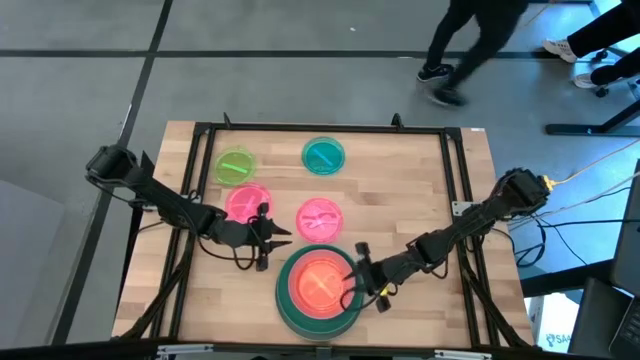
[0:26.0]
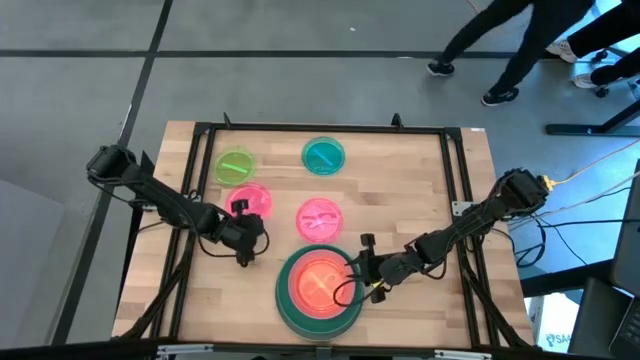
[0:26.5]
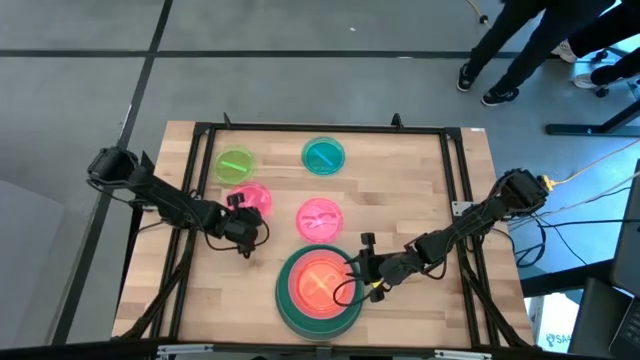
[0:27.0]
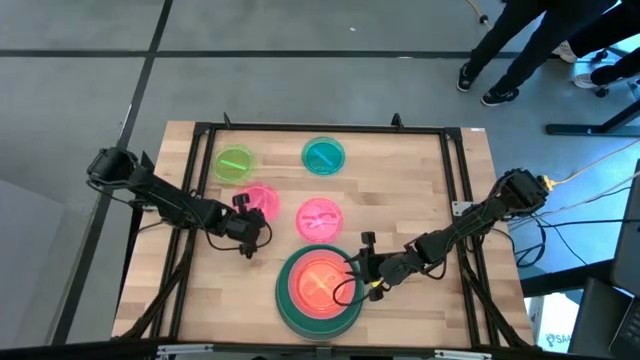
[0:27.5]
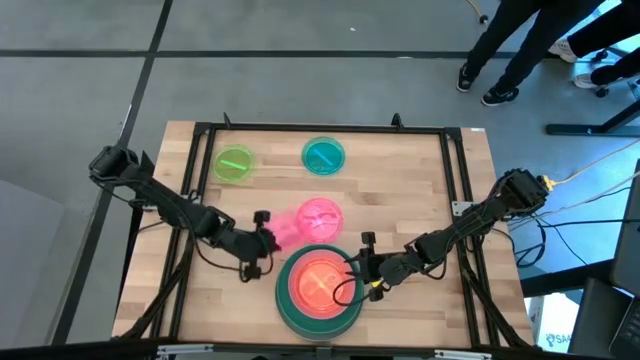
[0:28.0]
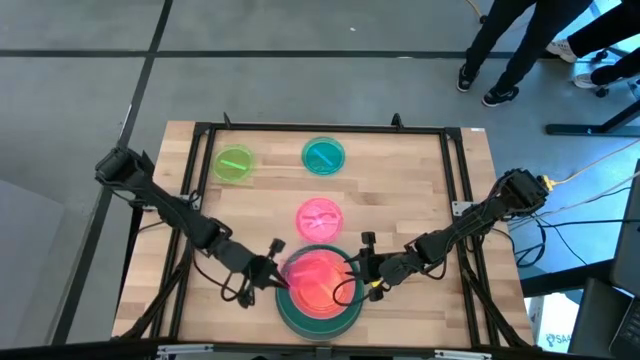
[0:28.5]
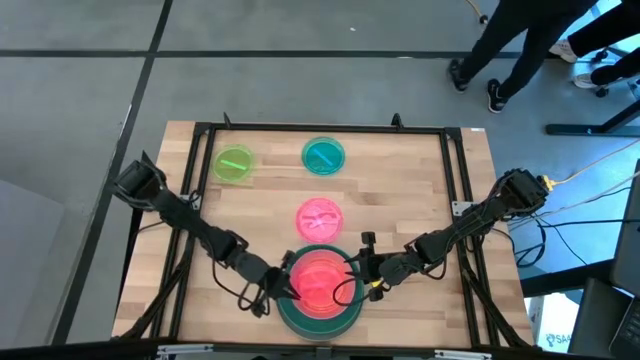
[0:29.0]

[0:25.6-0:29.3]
Task: Stack plastic plates
Stack the left pink transparent plate on the orange transparent plate

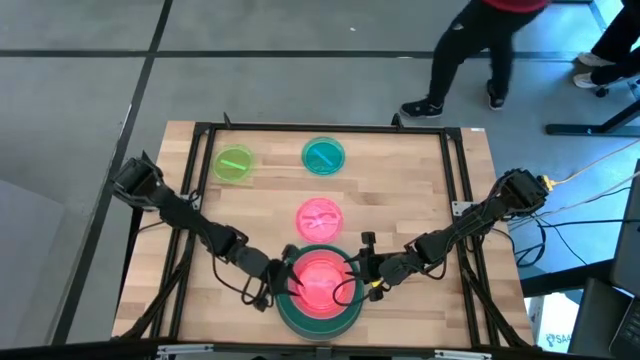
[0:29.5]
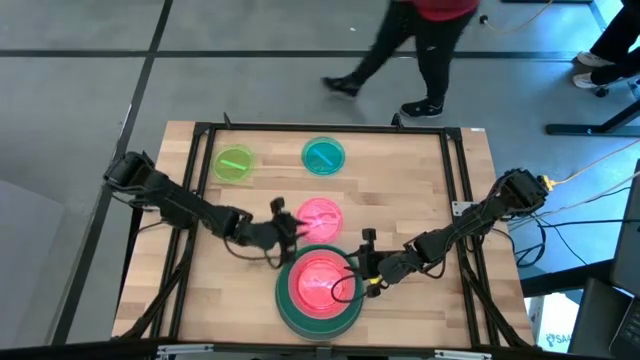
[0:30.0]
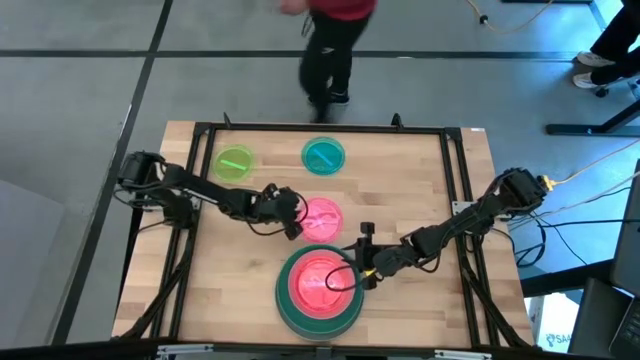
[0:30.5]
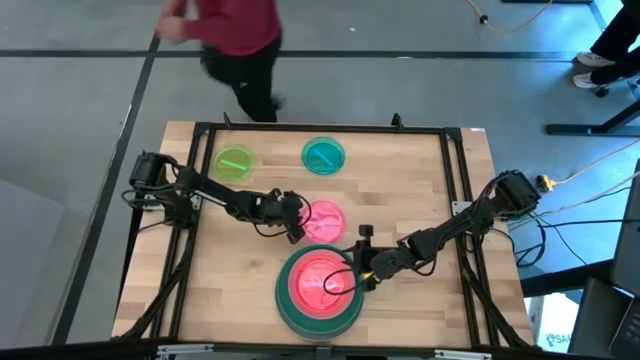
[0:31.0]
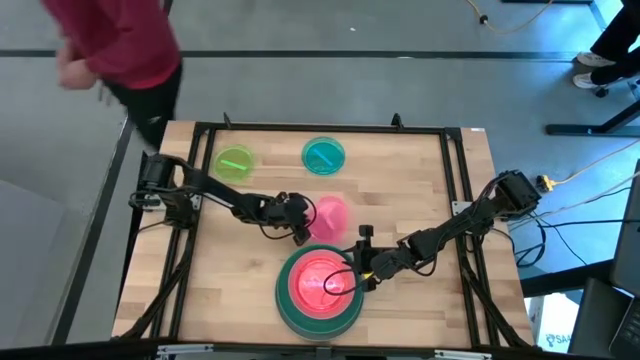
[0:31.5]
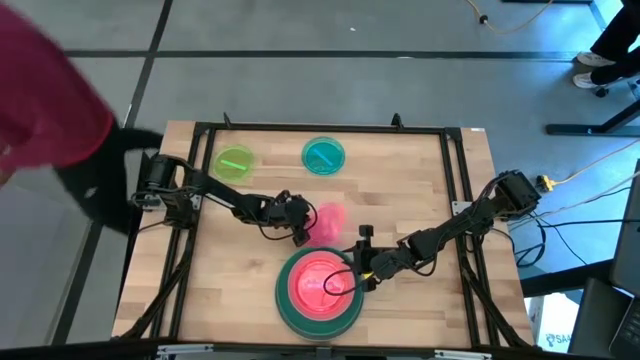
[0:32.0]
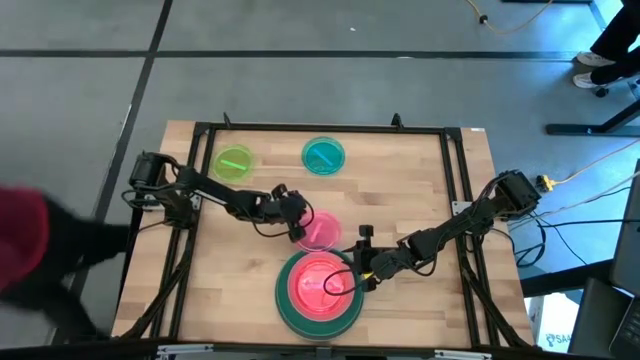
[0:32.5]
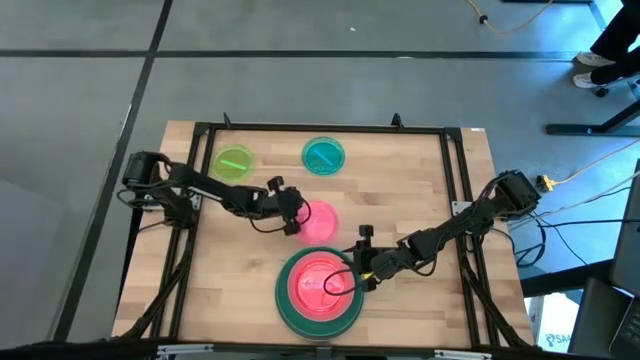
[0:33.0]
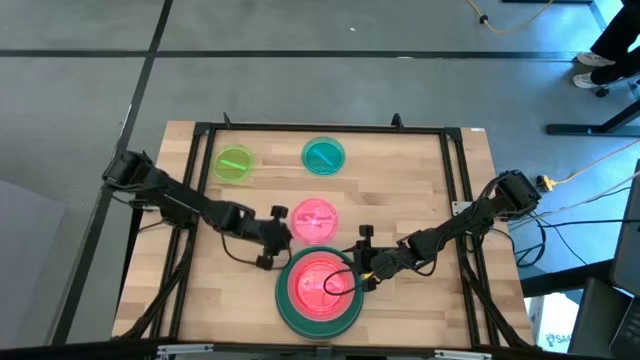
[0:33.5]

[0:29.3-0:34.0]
Stack the pink transparent plate on the pink transparent plate

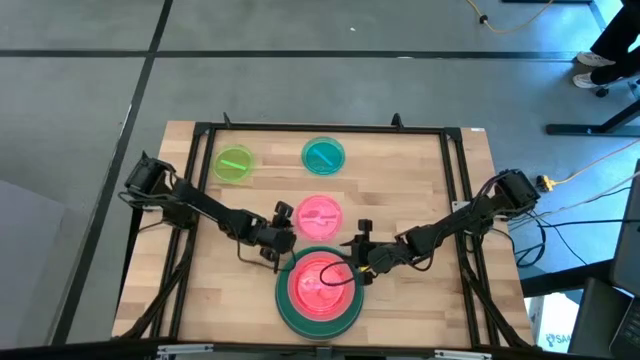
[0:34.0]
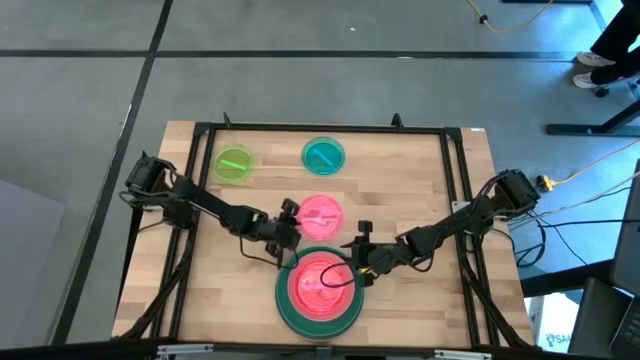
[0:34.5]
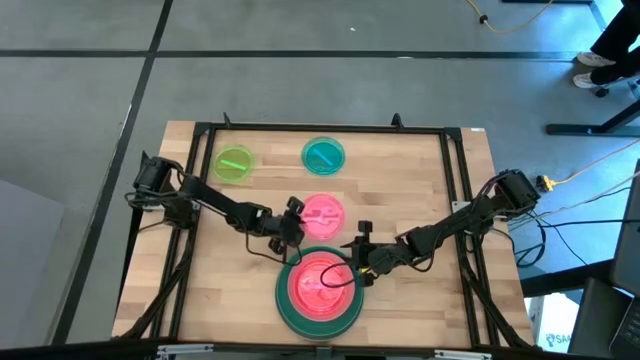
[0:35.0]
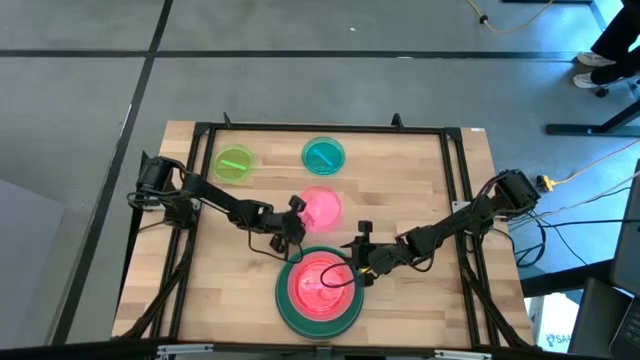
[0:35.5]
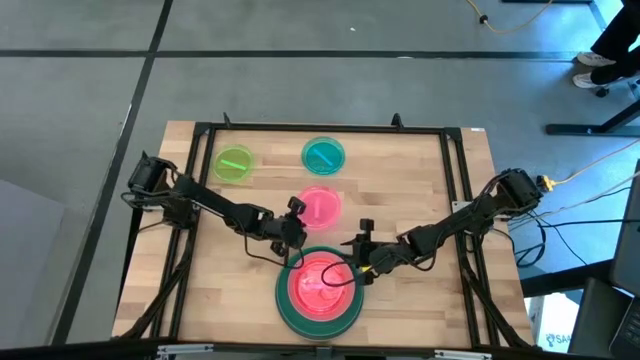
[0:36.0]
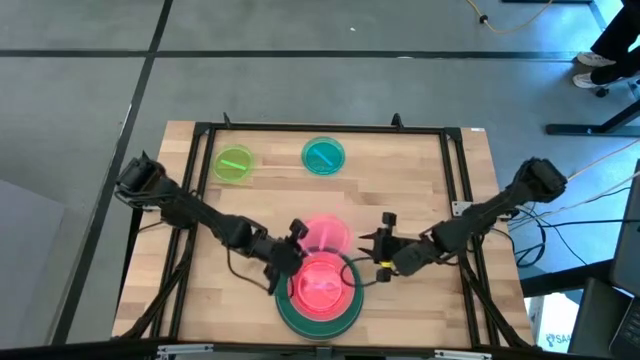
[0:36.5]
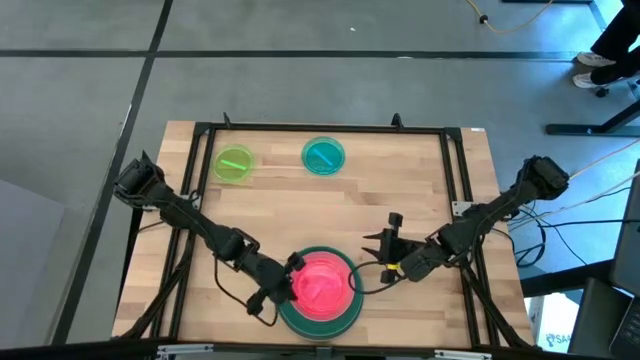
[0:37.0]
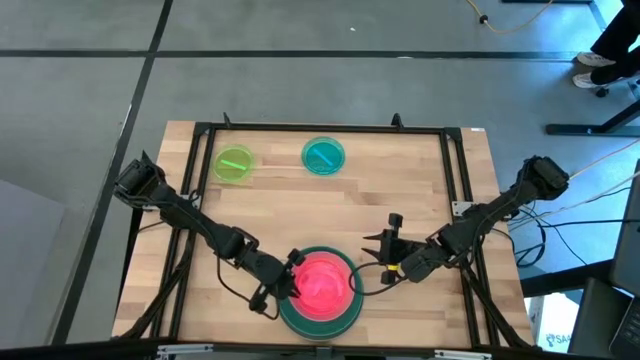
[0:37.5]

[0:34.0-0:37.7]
Stack the pink transparent plate on the pink transparent plate

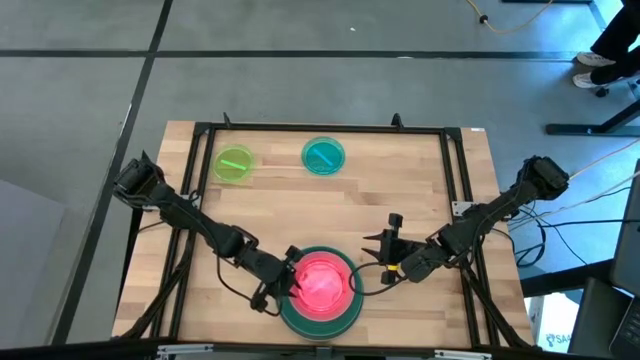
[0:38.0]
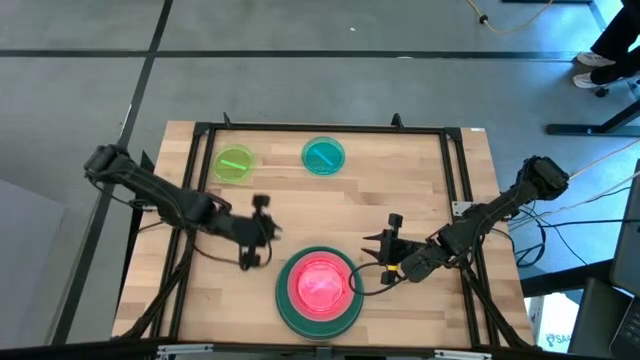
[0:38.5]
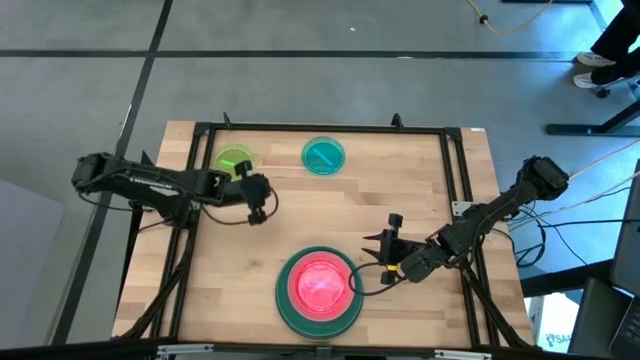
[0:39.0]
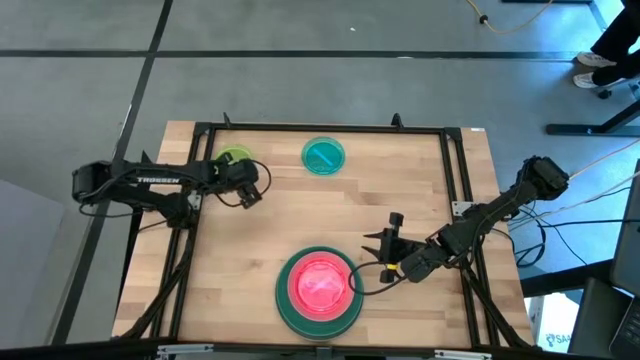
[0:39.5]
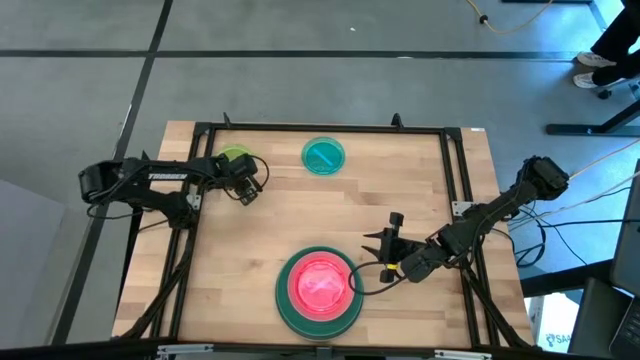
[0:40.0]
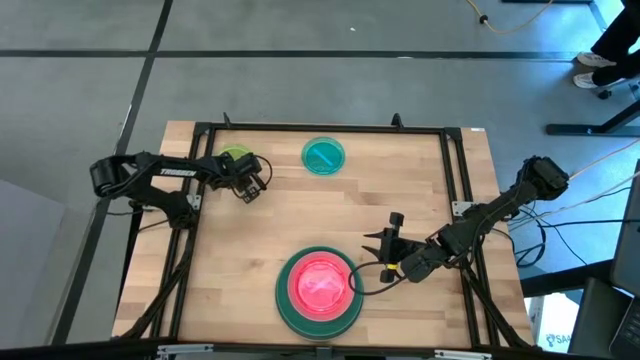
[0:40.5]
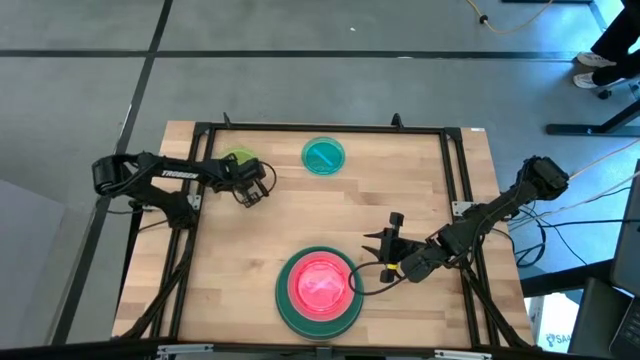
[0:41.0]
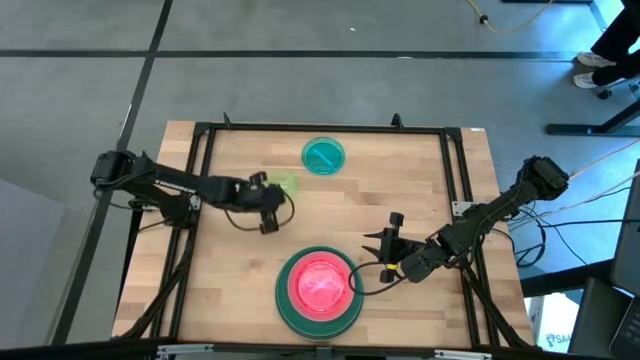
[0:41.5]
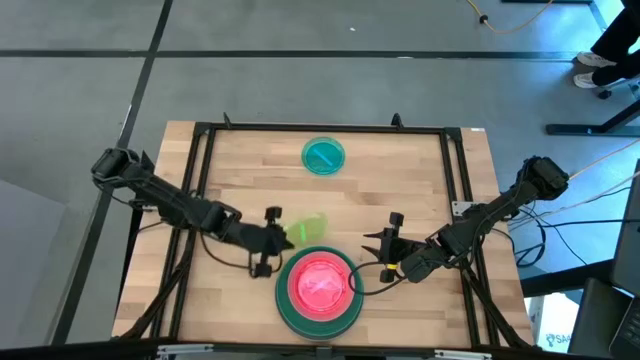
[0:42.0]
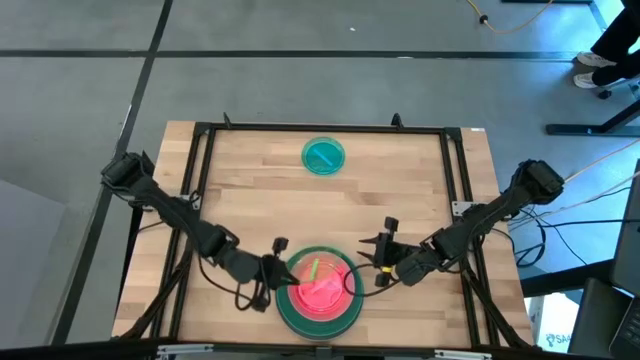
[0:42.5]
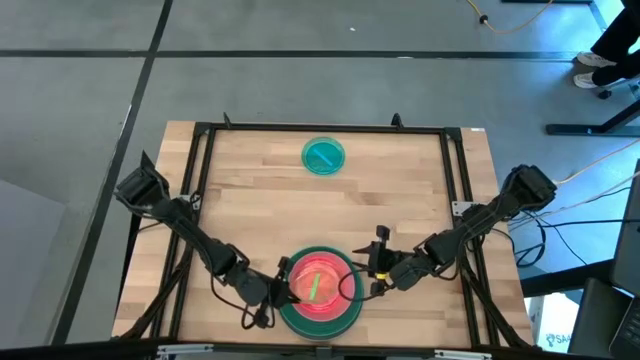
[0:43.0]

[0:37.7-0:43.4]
Stack the green transparent plate on the pink transparent plate

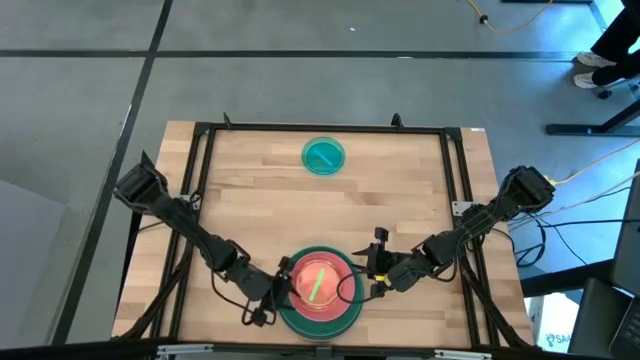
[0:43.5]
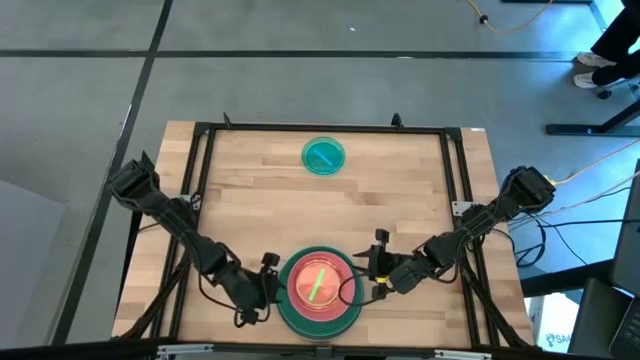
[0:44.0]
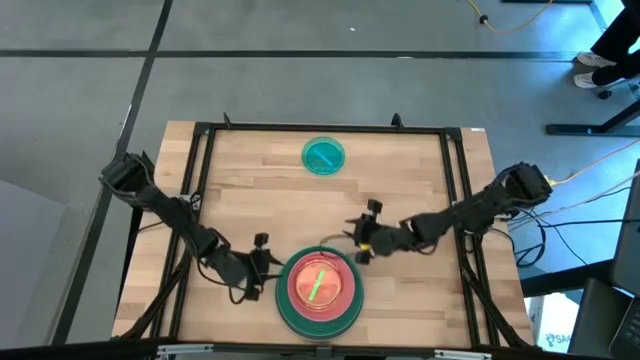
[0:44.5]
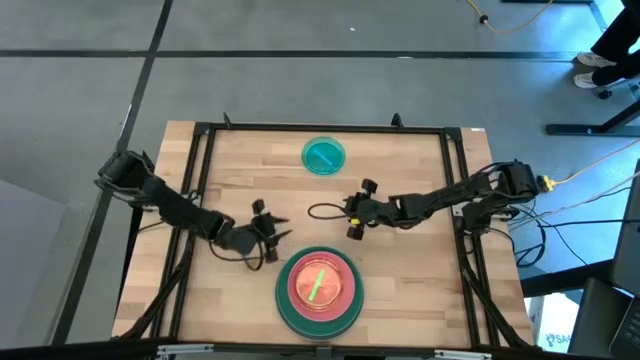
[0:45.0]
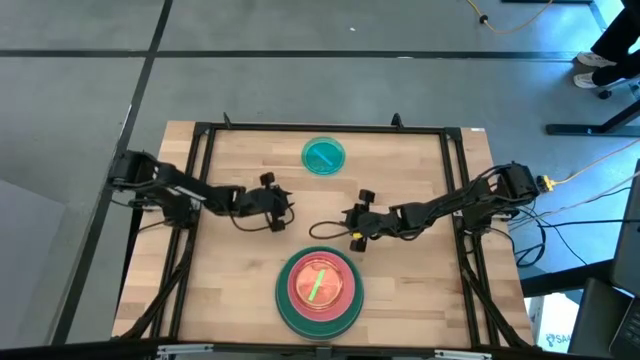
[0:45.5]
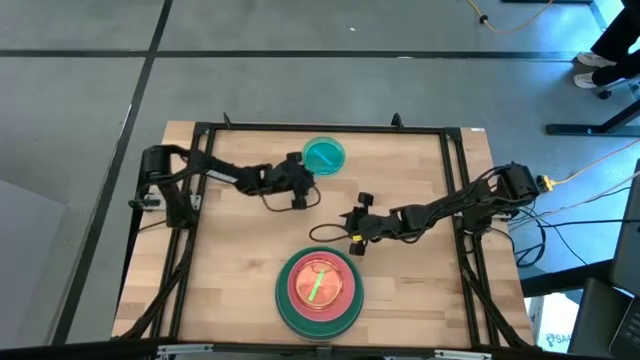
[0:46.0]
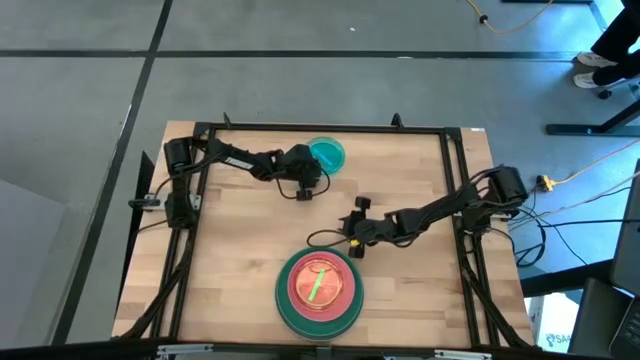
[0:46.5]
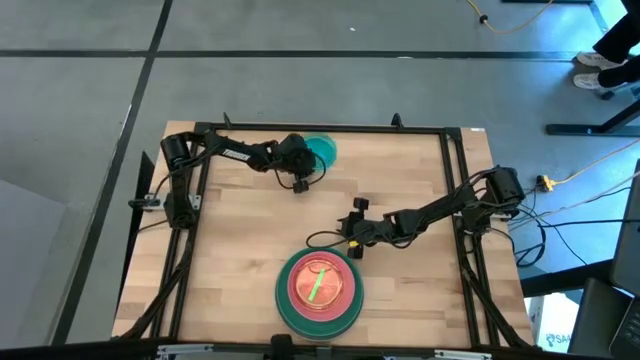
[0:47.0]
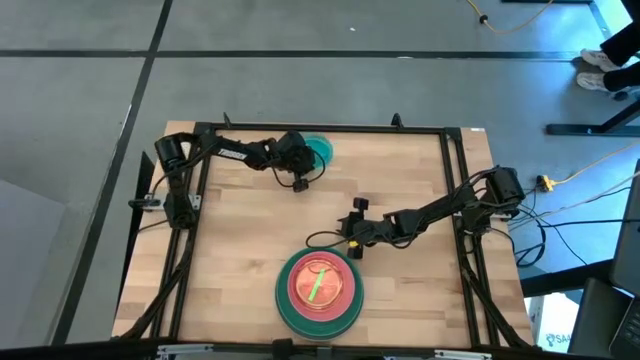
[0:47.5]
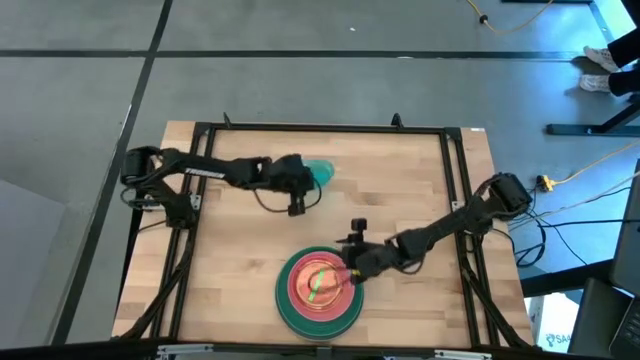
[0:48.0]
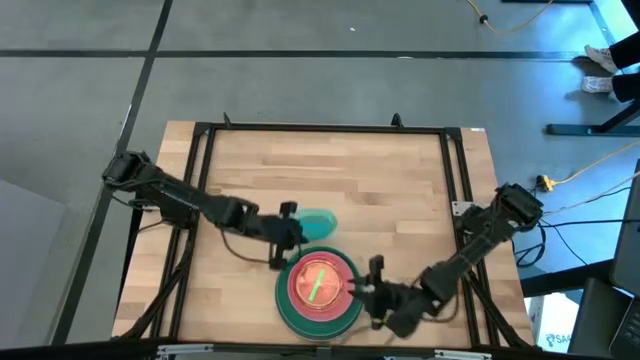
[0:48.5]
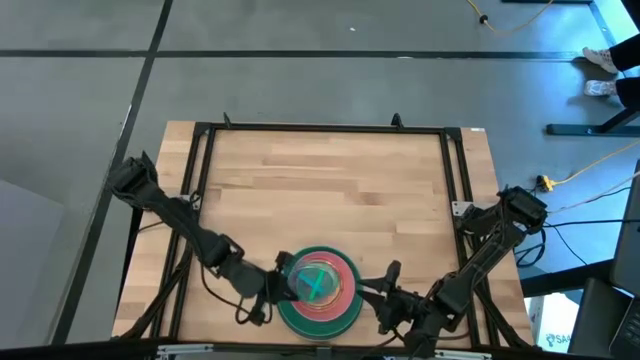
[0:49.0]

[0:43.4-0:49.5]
Stack the blue transparent plate on the green transparent plate
